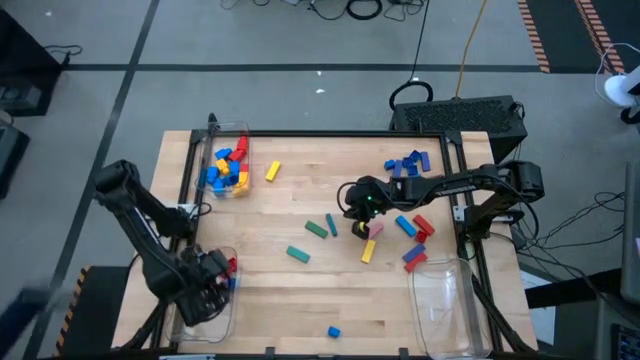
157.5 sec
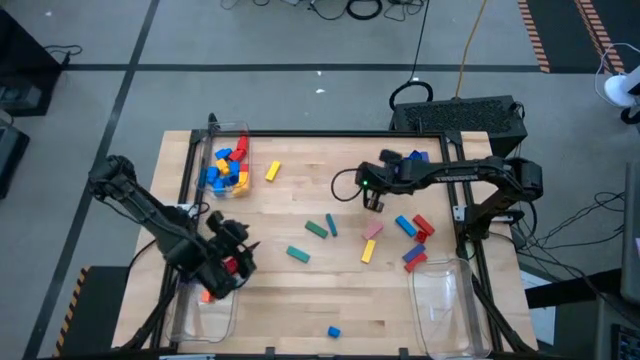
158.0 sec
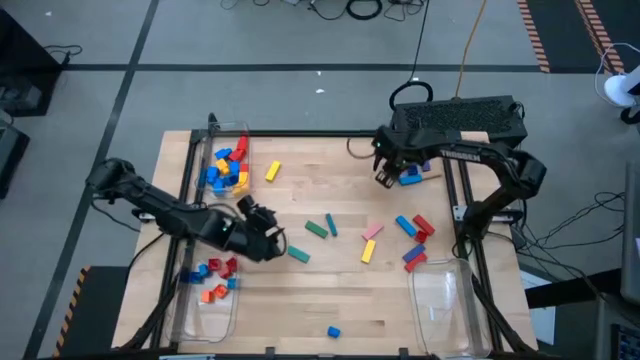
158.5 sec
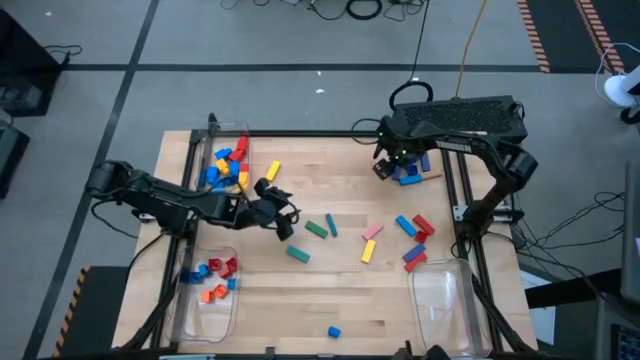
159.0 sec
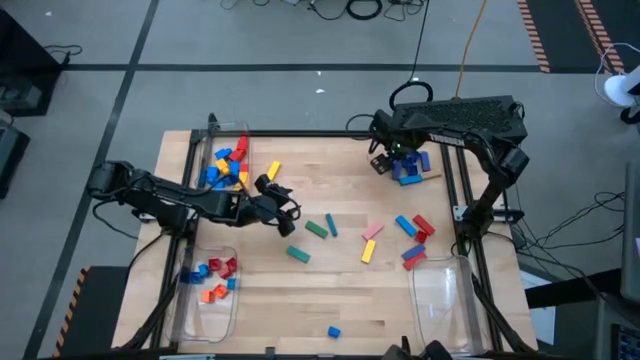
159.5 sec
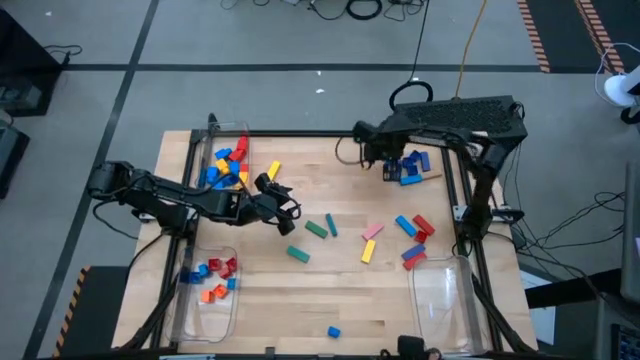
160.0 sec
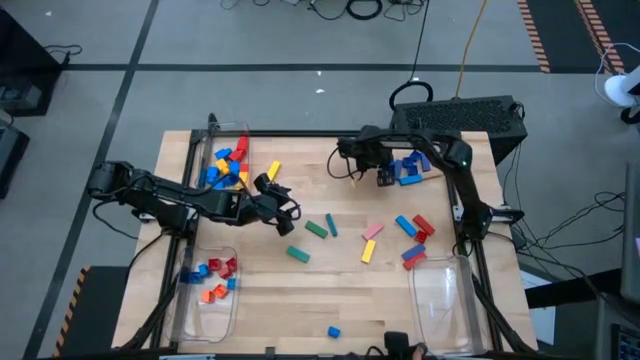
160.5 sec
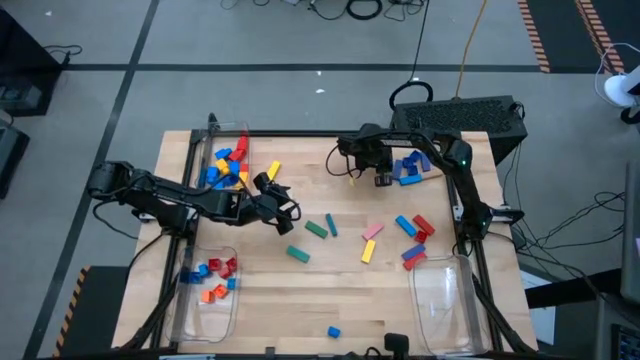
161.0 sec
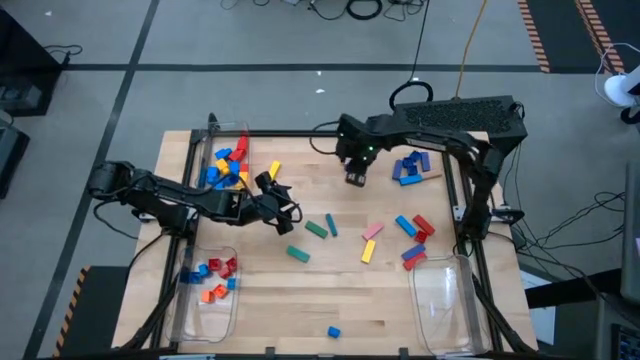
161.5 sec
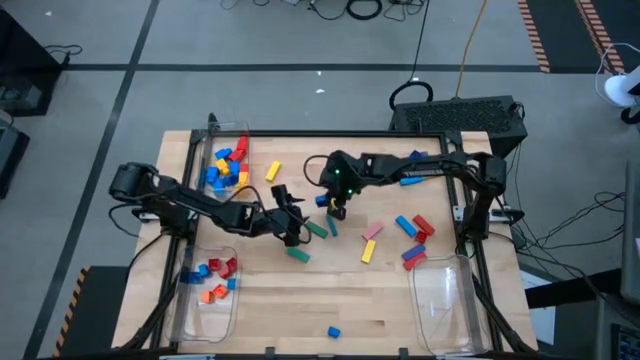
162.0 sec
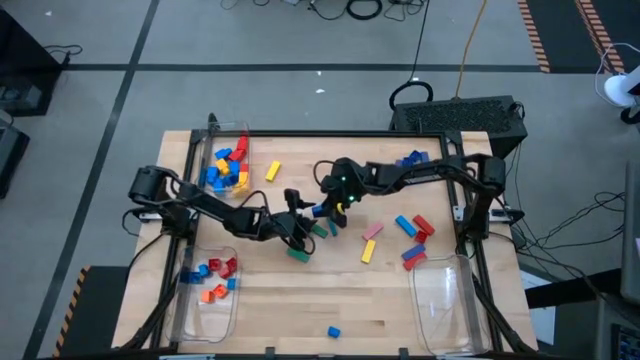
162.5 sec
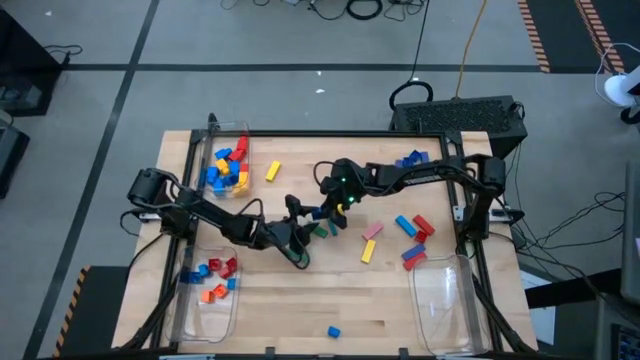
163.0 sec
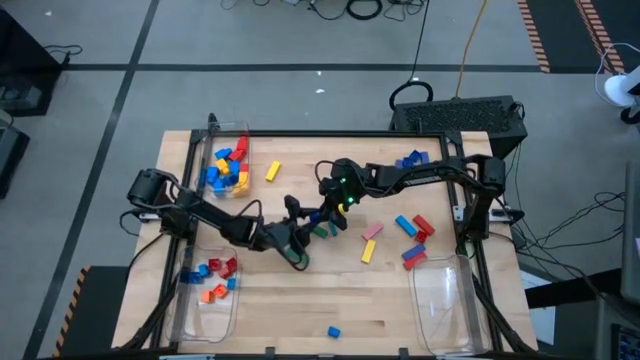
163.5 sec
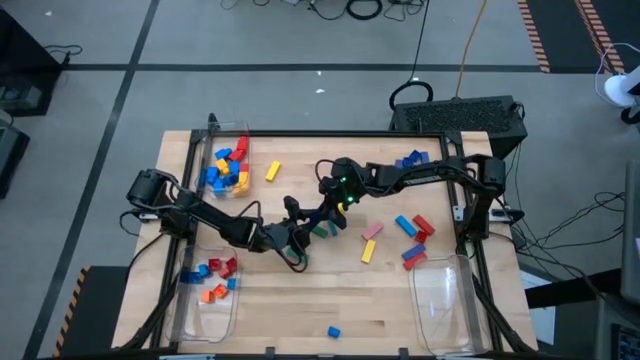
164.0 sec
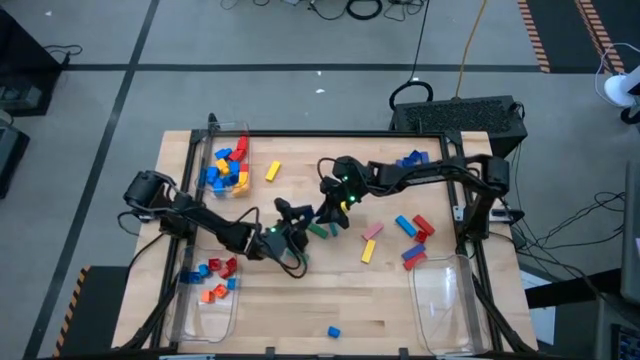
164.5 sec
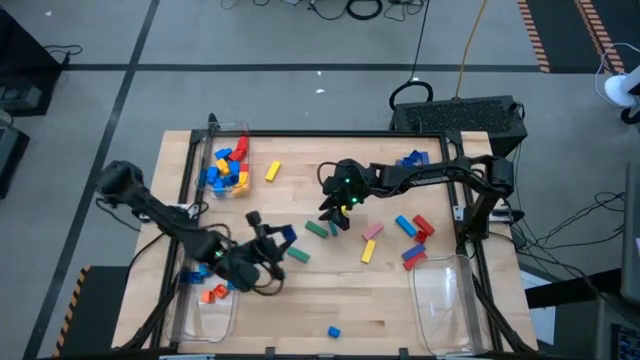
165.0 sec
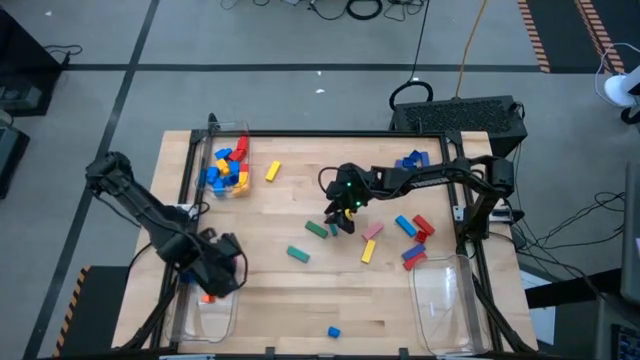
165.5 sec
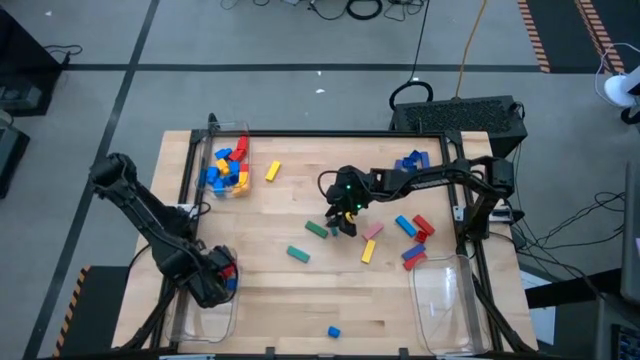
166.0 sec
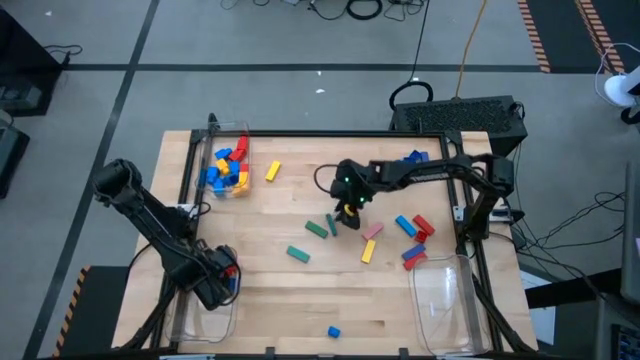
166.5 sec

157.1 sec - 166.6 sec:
Task: Sort blocks by size
Put the blue four stud game piece into the bottom left transparent bin

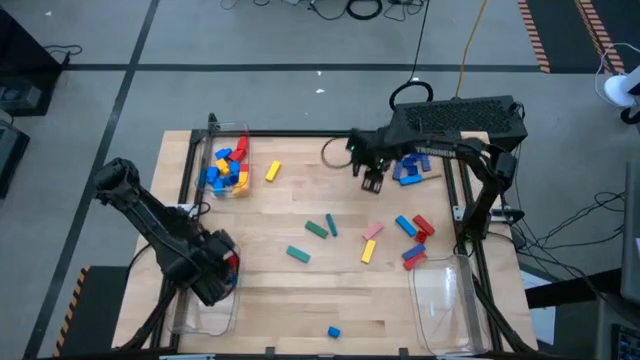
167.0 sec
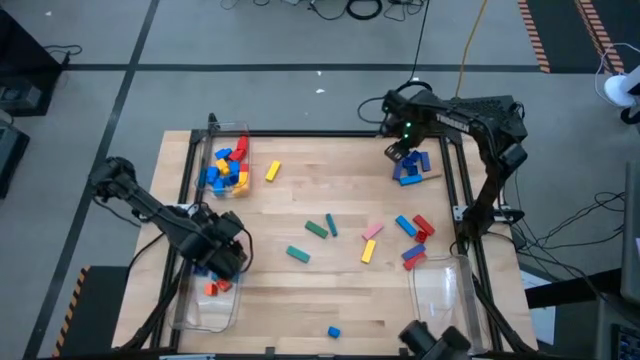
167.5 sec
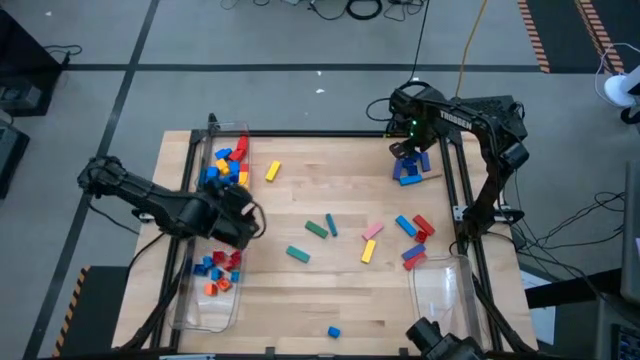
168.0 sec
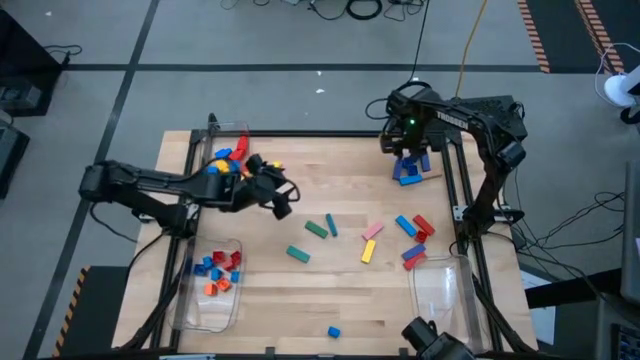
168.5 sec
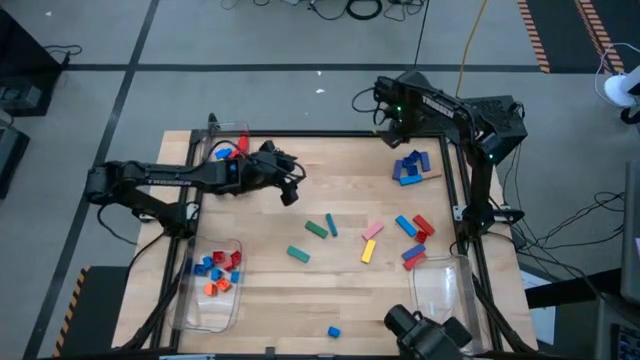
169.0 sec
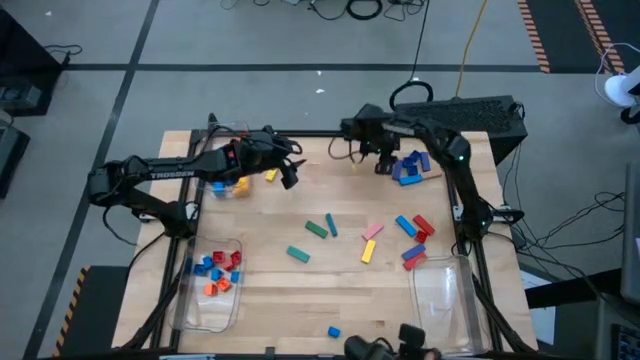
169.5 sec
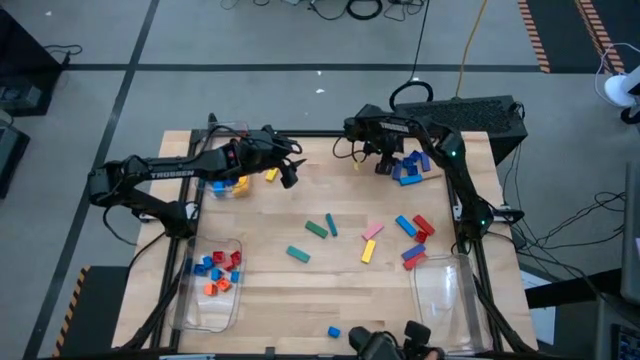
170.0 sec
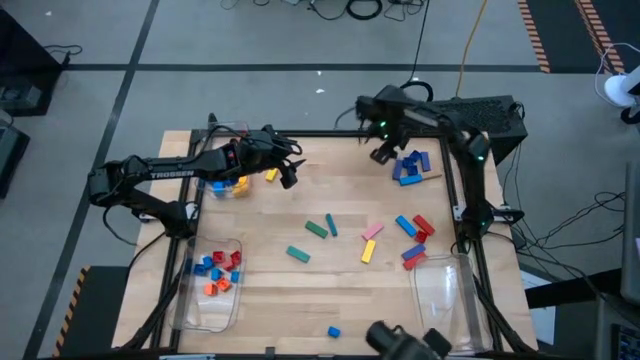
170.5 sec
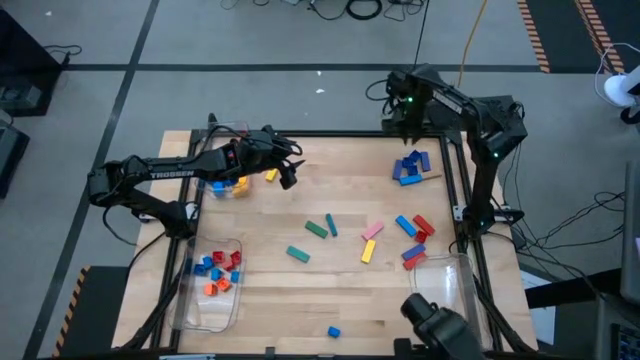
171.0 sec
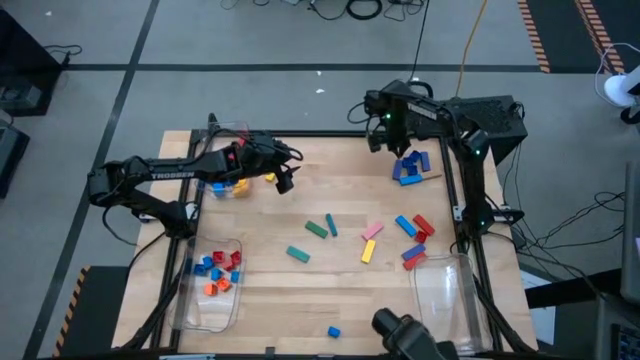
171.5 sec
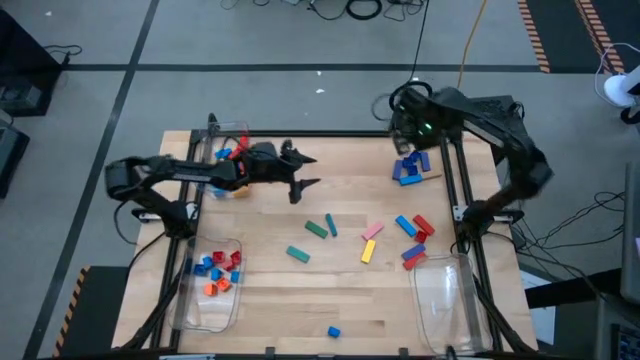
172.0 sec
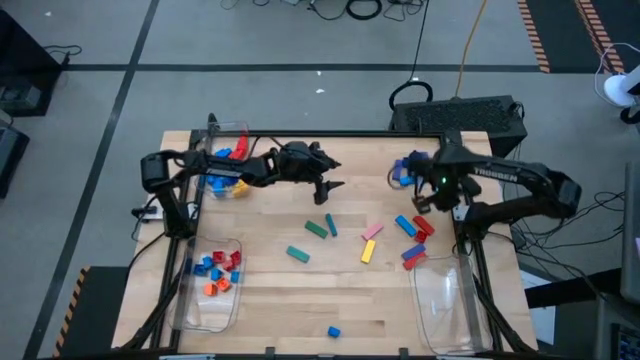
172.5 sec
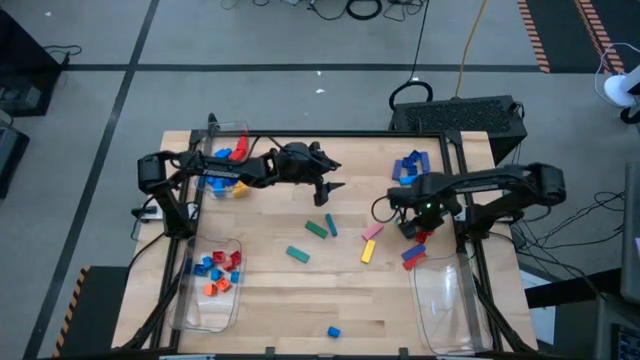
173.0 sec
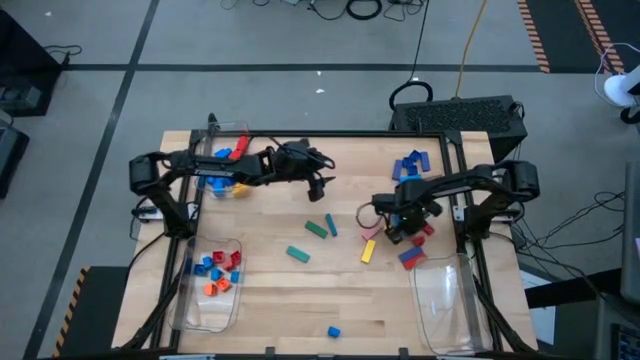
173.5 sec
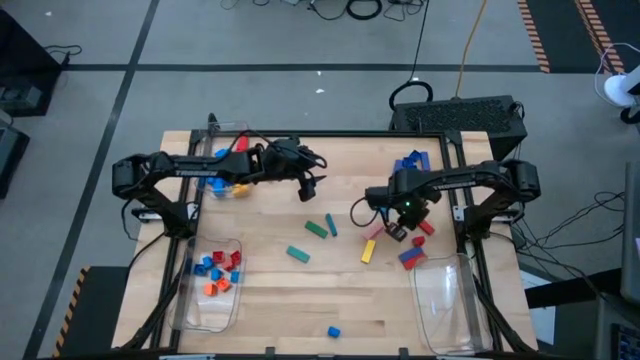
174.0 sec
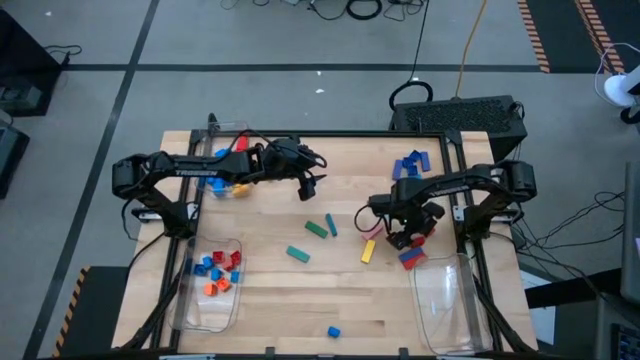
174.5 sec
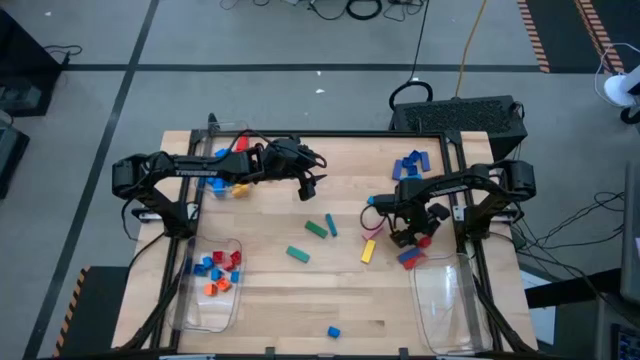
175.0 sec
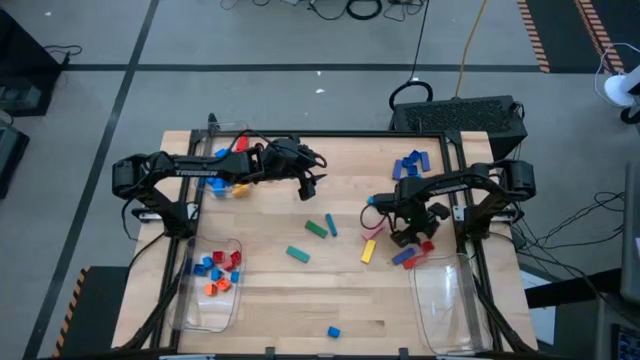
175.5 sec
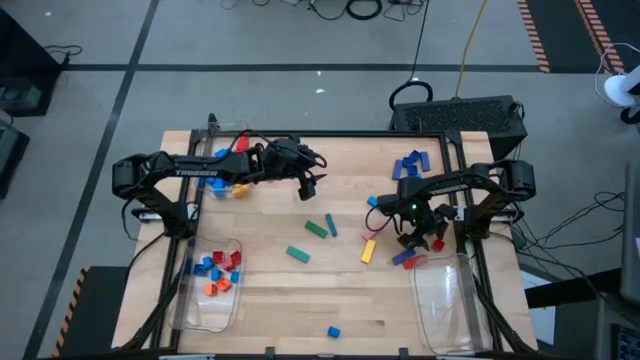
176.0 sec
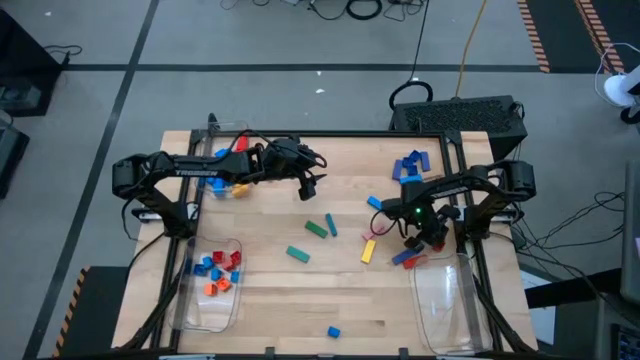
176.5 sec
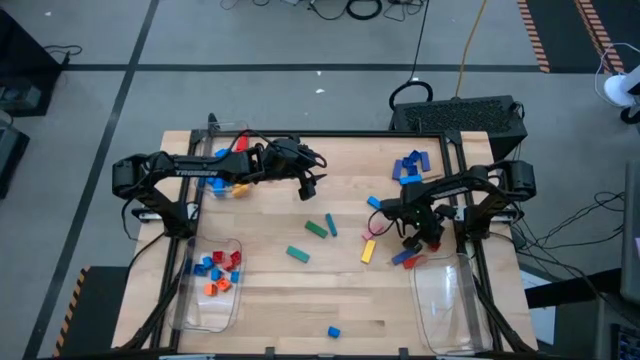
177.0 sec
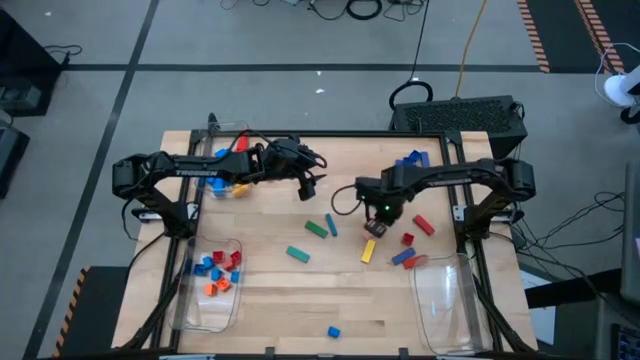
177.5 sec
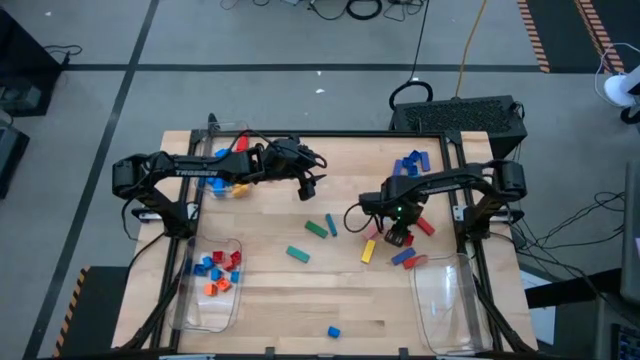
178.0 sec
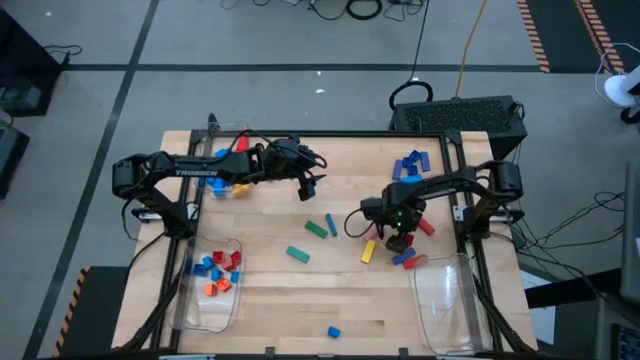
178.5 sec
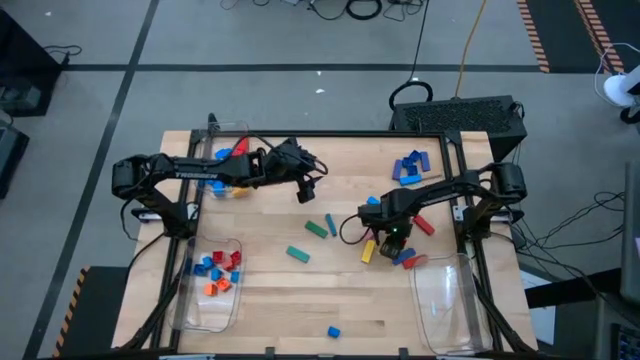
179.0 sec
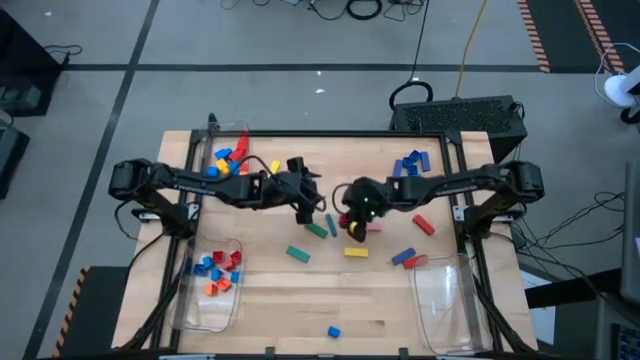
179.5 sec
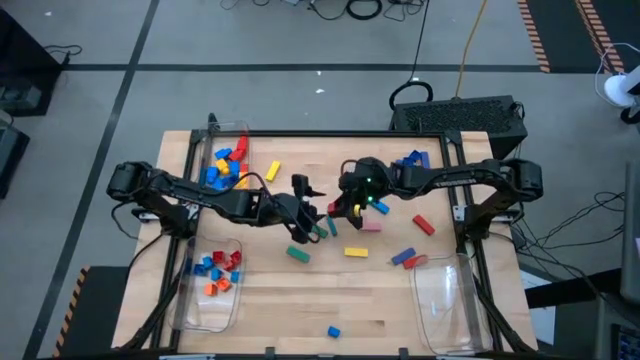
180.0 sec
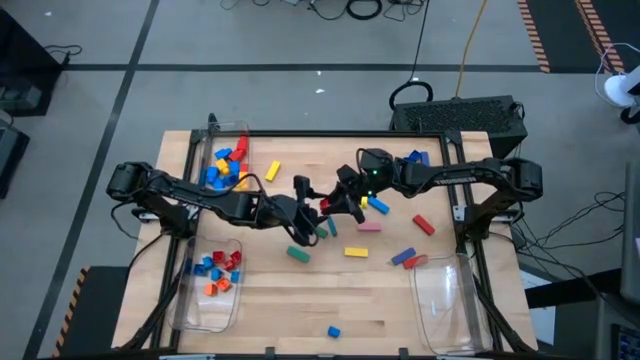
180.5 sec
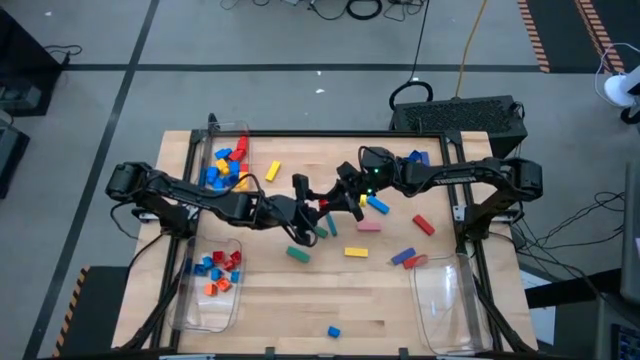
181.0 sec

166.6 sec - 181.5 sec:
Put the red four stud game piece into the bottom left transparent bin
